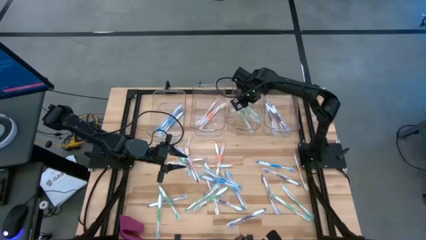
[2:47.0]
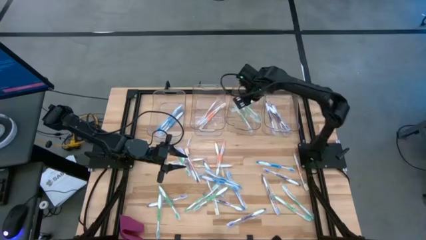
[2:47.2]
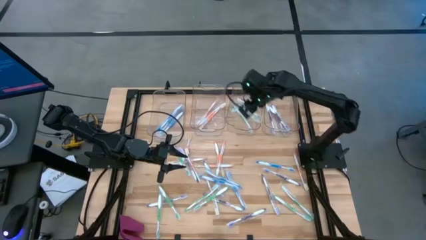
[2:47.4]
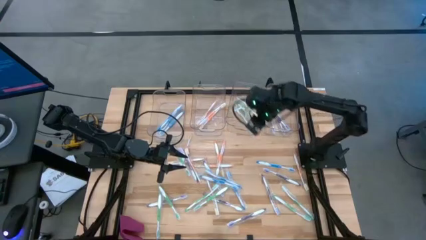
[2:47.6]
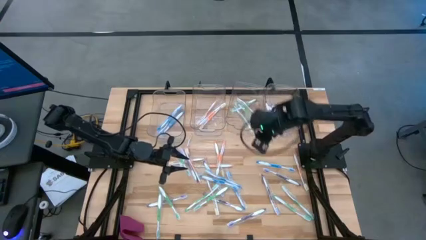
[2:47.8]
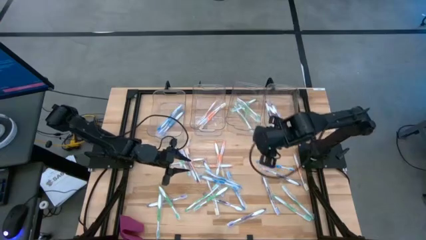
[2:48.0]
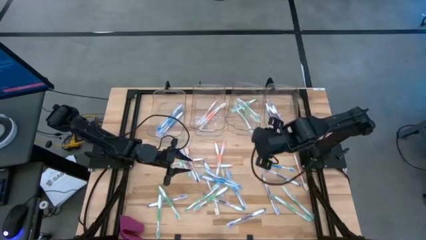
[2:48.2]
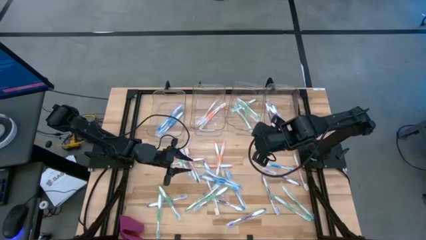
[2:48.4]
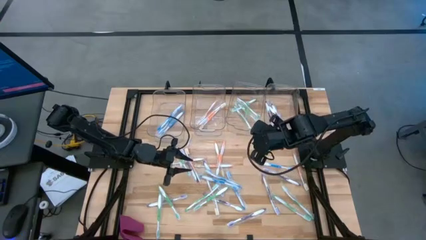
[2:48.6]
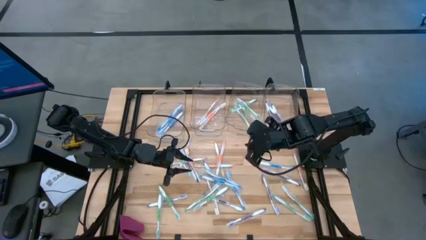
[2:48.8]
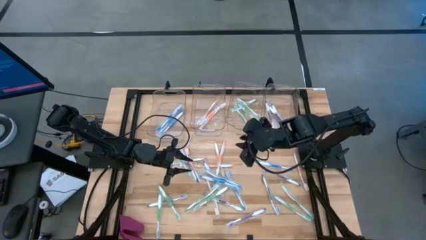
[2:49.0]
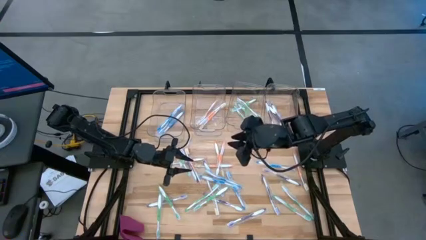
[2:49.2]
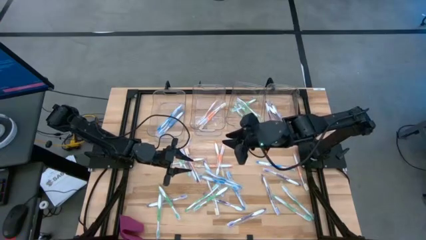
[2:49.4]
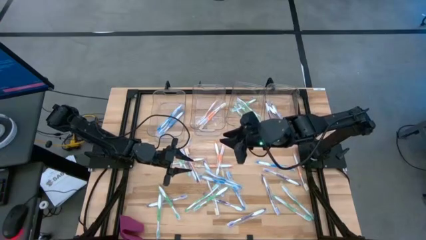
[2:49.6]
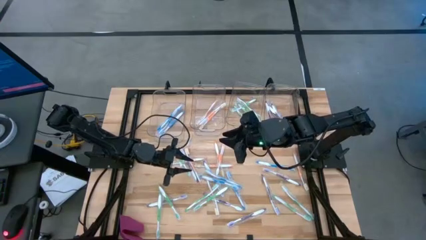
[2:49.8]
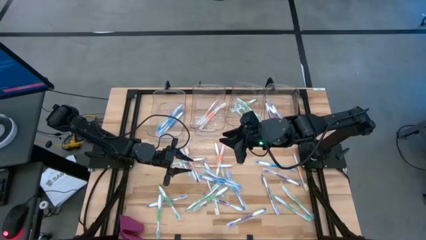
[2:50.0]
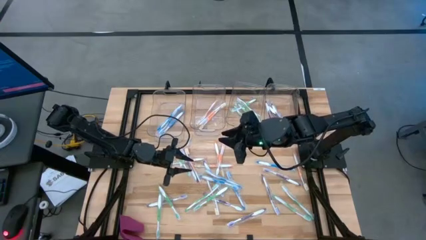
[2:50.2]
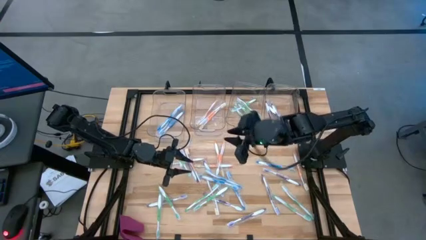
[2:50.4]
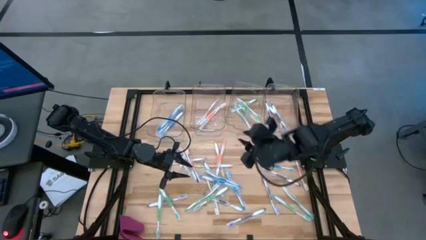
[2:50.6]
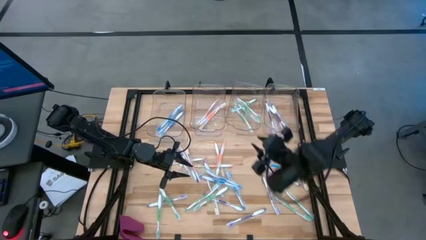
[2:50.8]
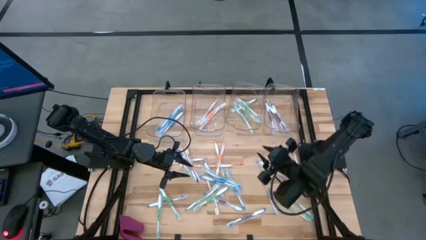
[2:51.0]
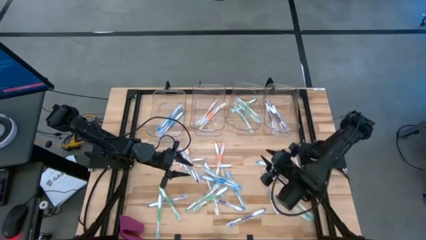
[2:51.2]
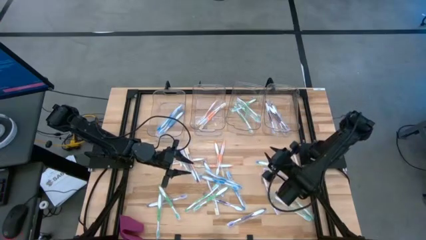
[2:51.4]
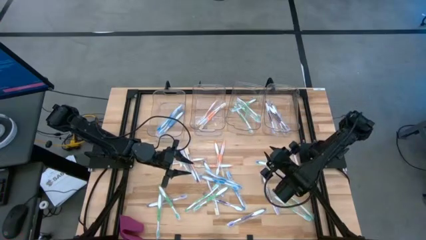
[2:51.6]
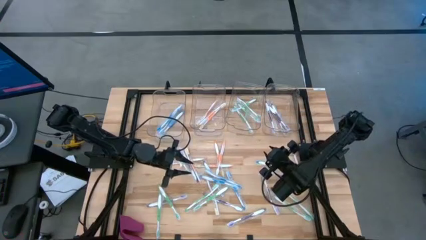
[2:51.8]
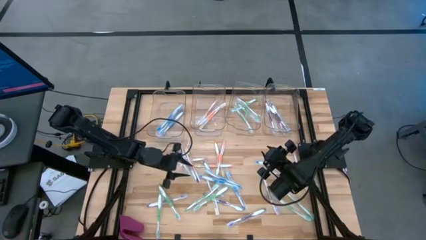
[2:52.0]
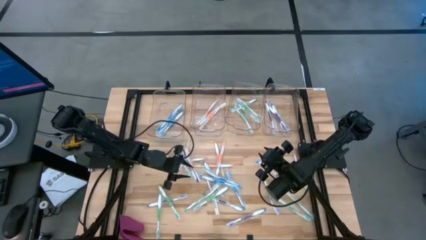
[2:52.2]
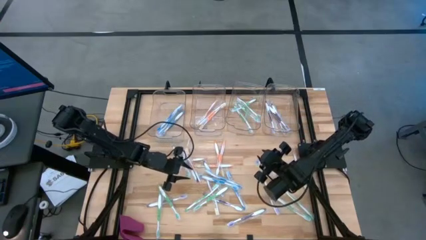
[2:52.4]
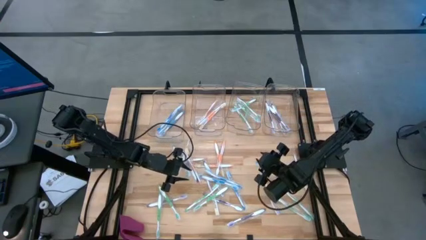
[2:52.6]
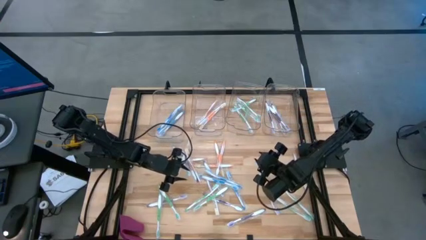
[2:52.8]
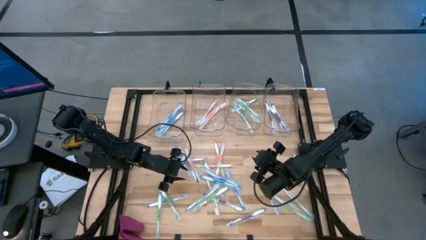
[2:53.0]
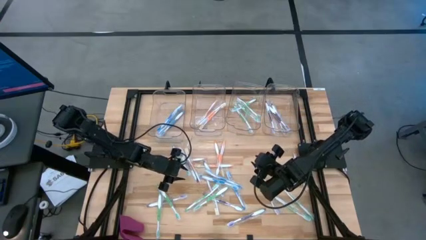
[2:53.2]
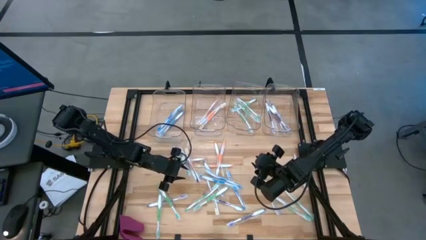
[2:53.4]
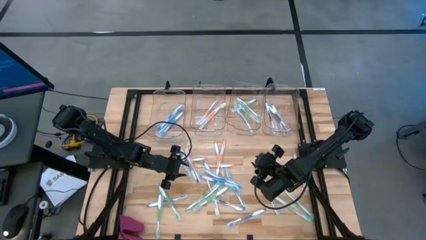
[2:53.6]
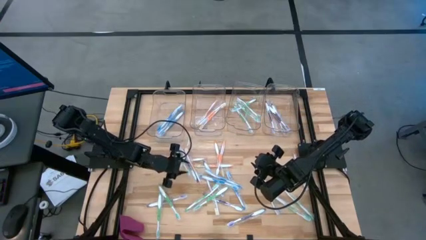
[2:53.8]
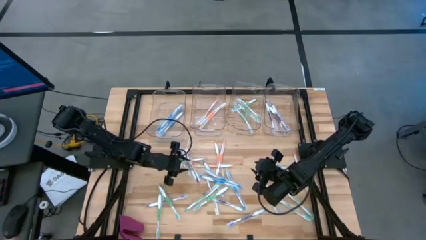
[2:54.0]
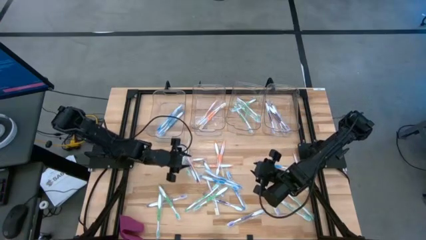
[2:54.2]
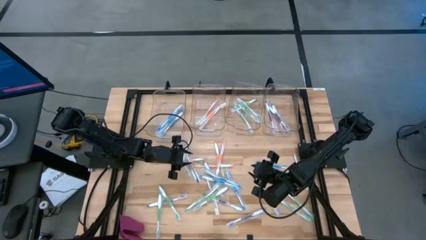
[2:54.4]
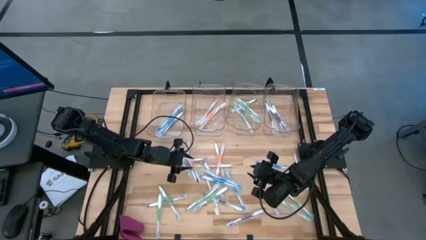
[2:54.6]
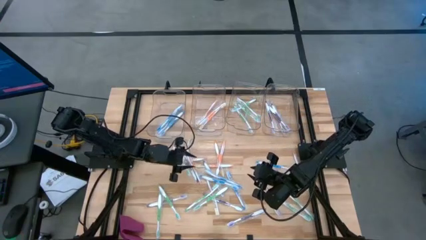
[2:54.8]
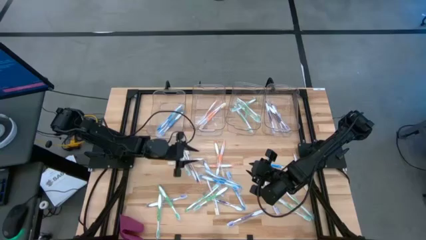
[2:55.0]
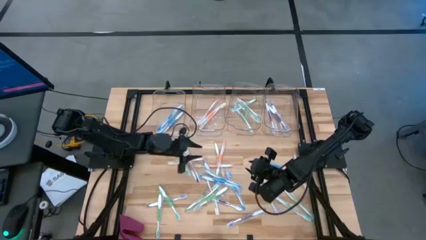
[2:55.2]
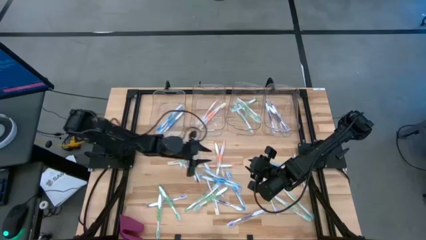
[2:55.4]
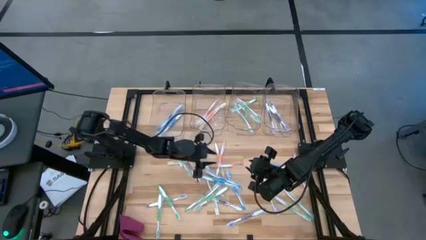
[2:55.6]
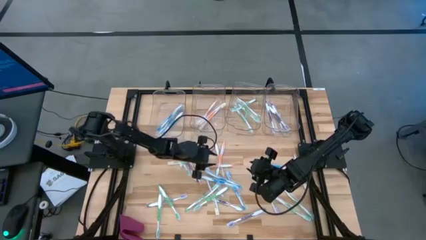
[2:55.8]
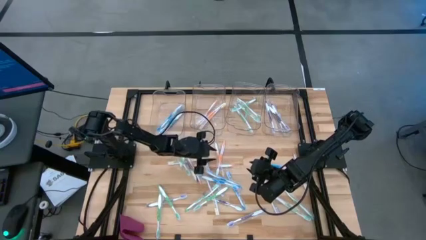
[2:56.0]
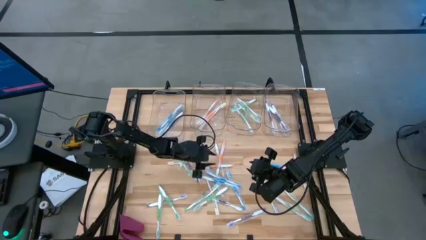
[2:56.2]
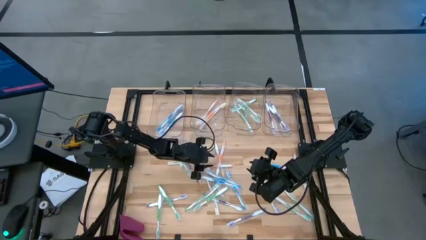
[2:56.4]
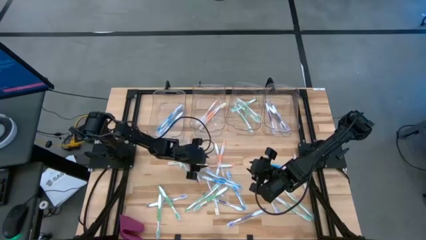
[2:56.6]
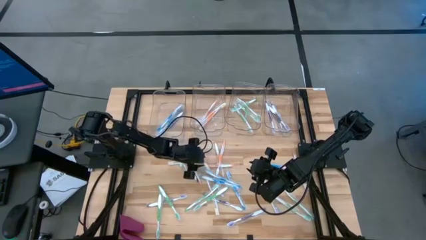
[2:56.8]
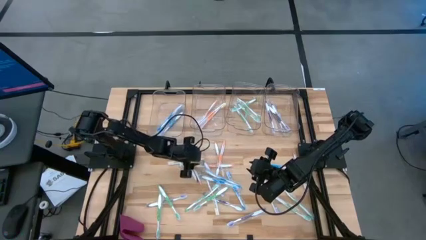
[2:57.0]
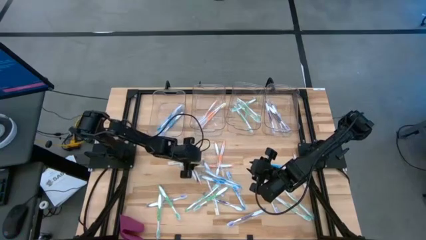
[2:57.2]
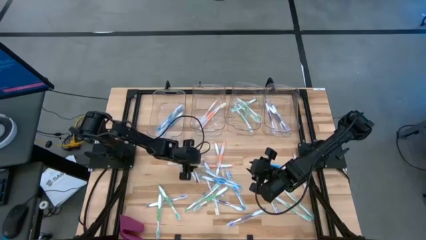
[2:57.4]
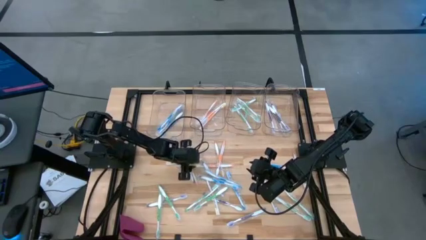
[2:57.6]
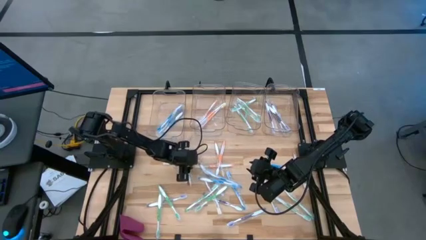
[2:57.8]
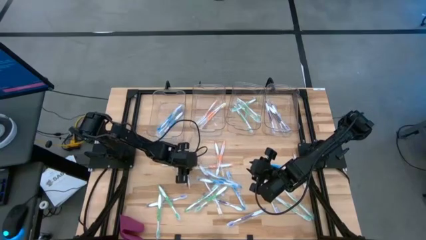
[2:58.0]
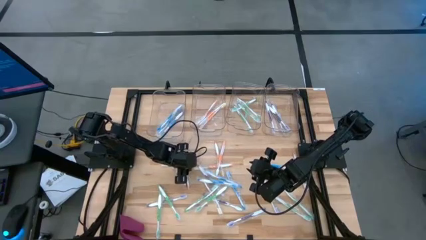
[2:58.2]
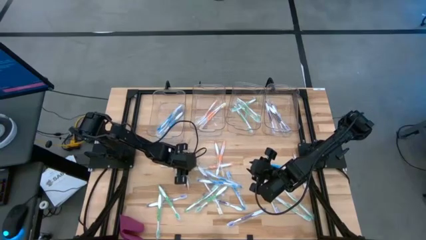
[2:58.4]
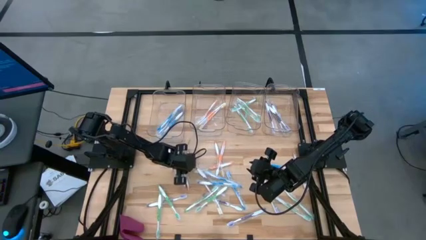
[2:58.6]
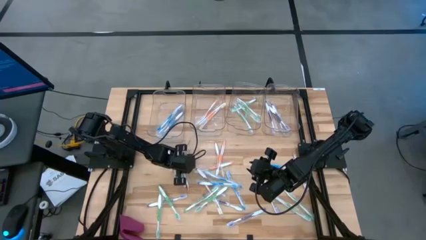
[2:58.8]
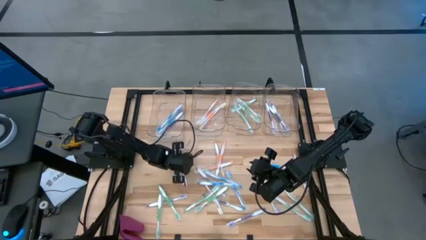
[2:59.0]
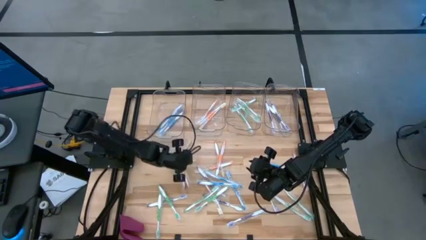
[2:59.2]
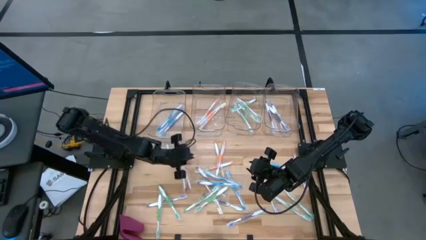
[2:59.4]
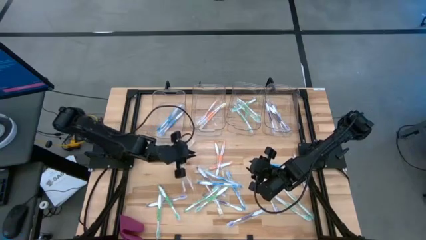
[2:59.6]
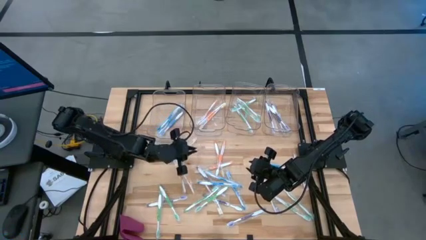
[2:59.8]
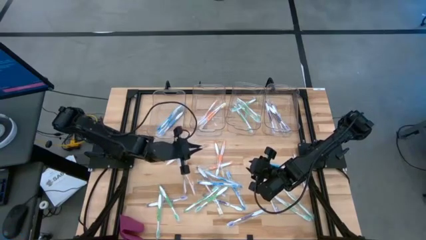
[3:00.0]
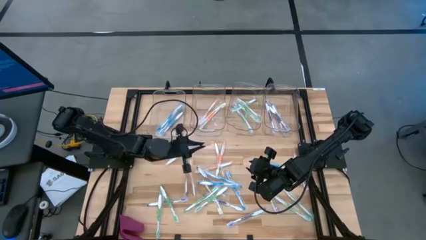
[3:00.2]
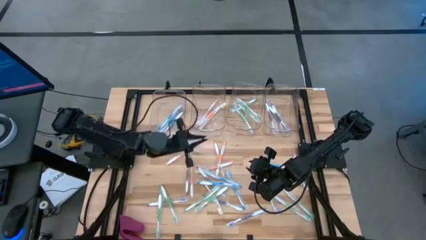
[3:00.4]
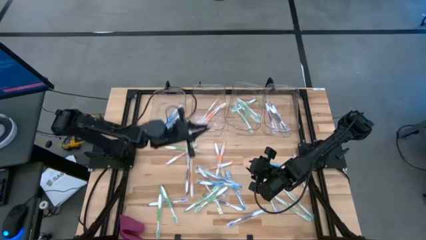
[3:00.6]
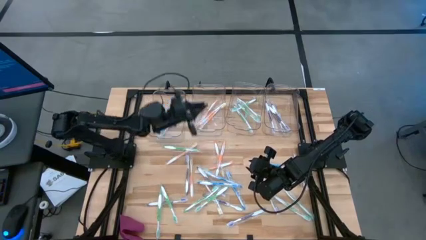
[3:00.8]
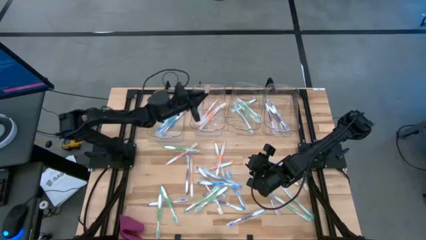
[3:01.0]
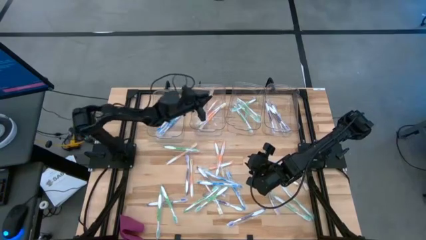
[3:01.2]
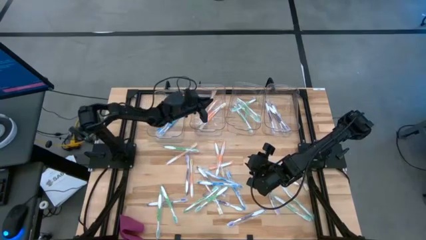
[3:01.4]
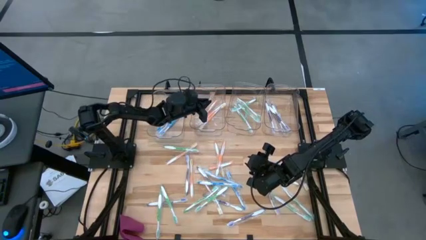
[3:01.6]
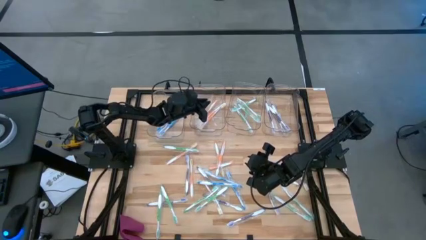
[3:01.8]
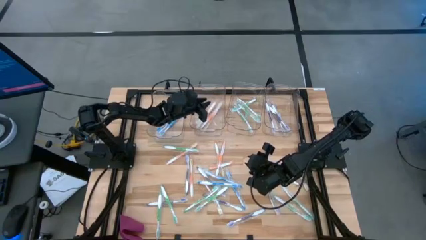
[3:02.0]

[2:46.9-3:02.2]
Task: Pick & Place Toothbrushes
Put the orange toothbrush into the middle left transparent bin

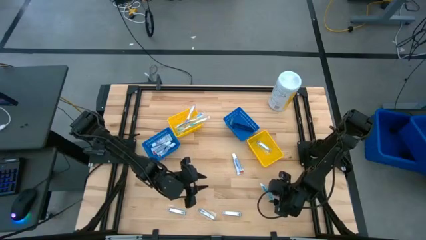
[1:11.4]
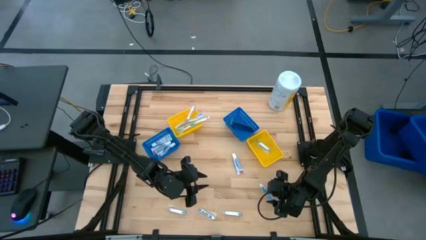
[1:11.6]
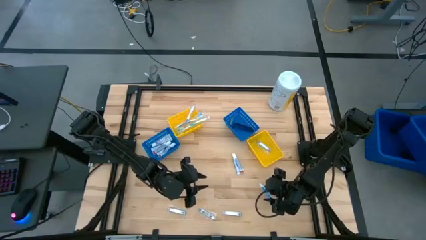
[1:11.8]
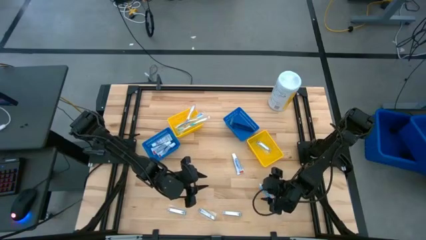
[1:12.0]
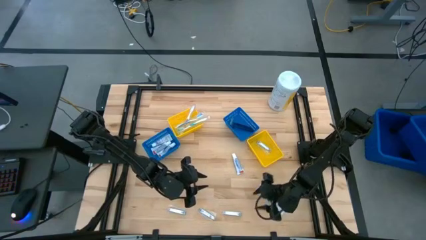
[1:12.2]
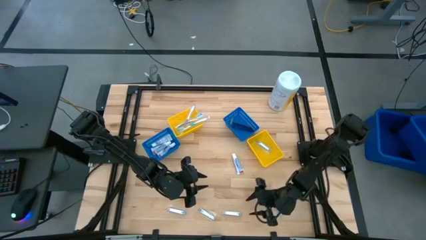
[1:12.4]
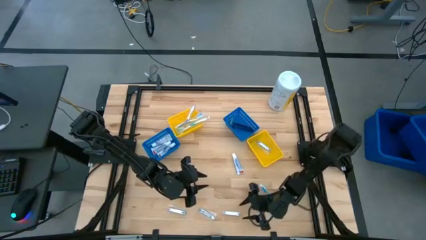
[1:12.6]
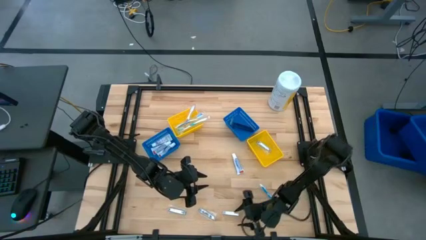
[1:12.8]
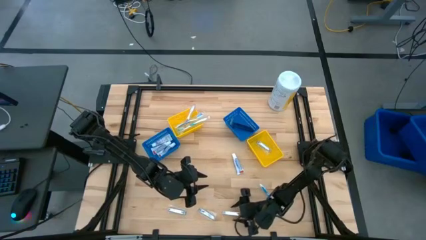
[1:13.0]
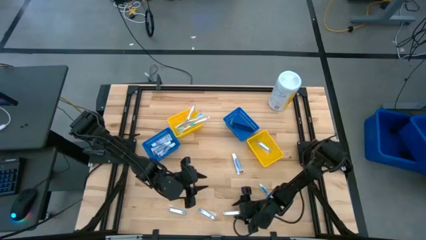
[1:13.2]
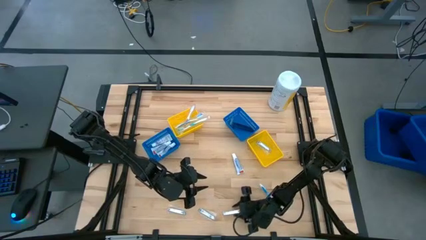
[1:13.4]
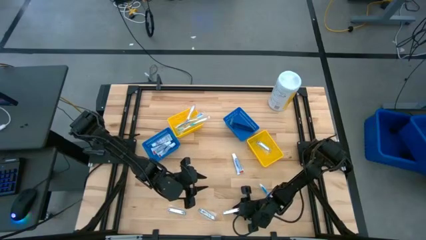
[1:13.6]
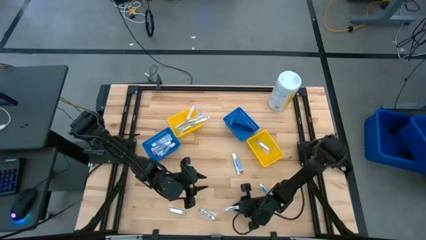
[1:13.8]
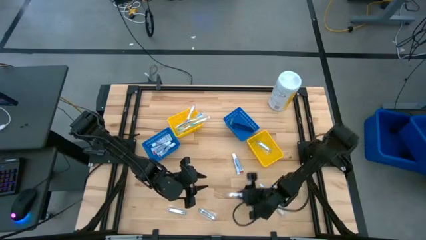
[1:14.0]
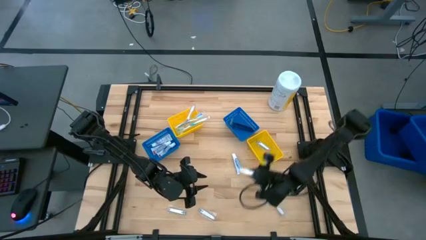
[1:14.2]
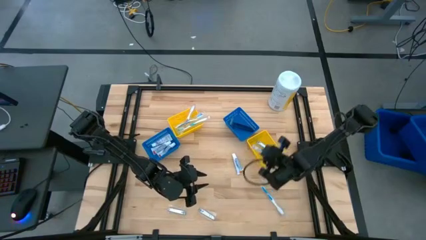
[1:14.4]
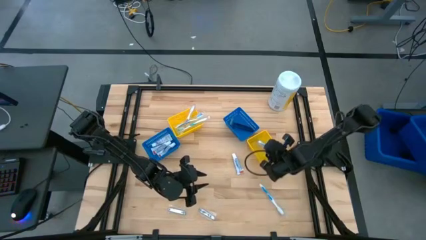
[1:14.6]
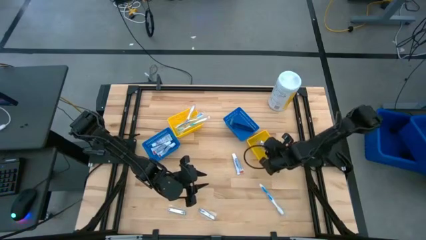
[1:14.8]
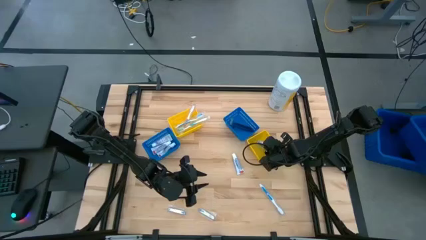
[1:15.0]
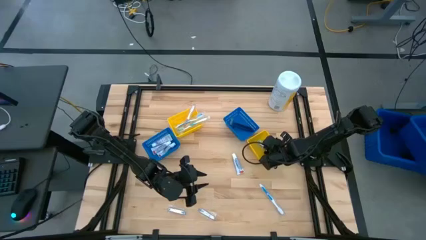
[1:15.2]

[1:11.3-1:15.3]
Task: Pick & Place Travel size toiletries
Put the nail cutter into the right yellow bin
